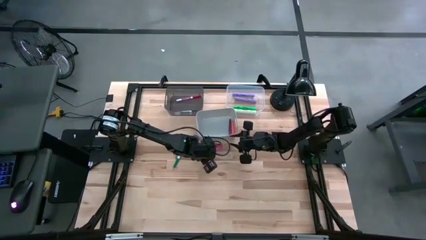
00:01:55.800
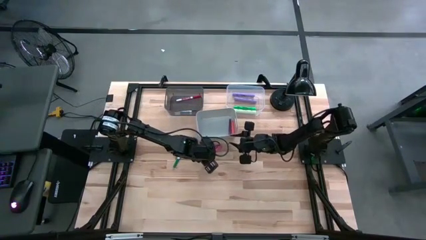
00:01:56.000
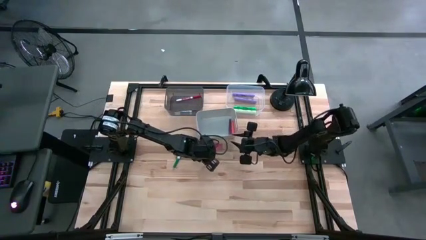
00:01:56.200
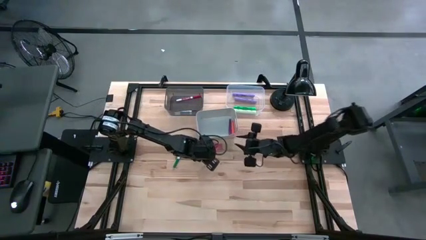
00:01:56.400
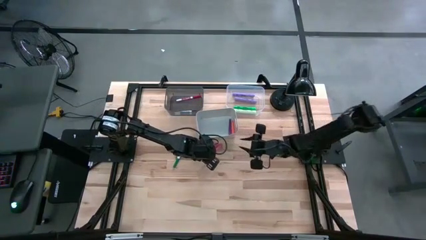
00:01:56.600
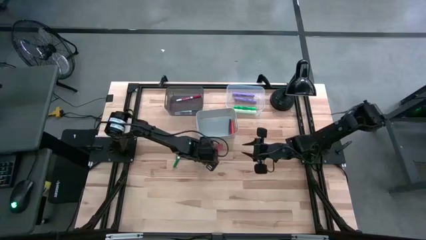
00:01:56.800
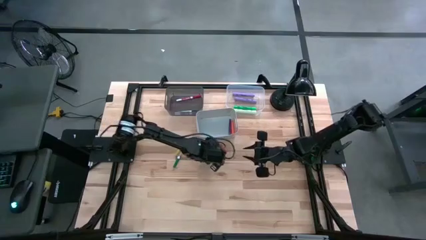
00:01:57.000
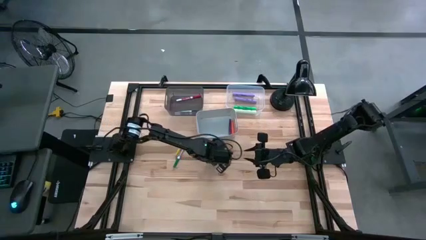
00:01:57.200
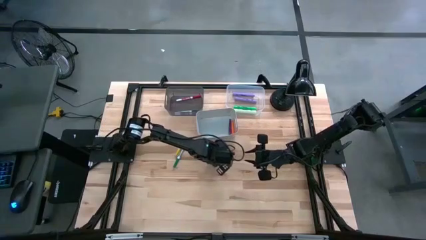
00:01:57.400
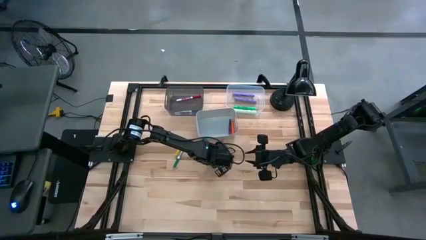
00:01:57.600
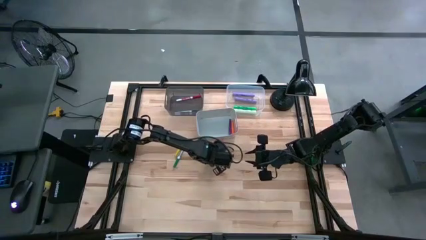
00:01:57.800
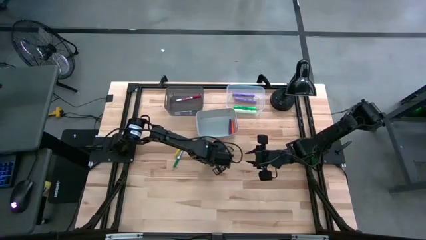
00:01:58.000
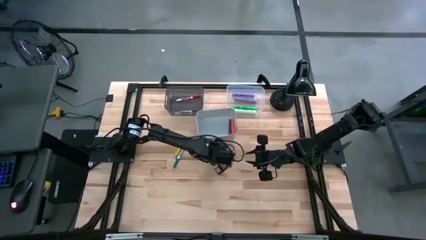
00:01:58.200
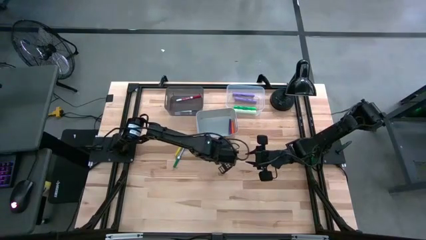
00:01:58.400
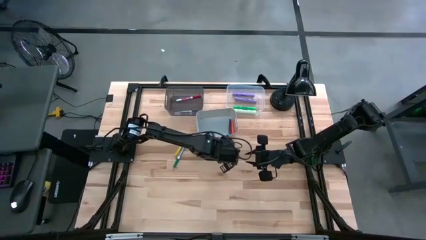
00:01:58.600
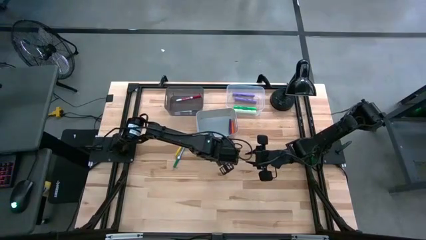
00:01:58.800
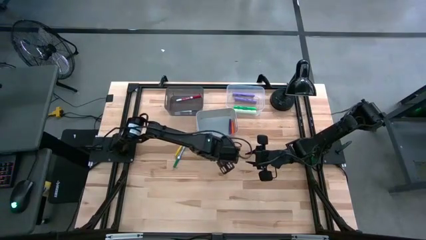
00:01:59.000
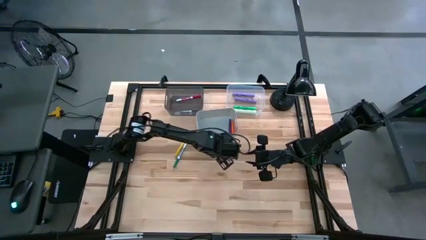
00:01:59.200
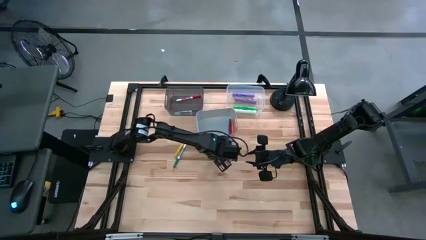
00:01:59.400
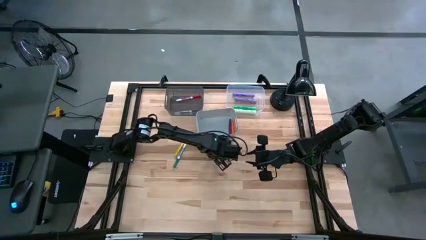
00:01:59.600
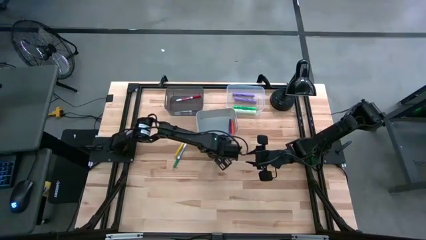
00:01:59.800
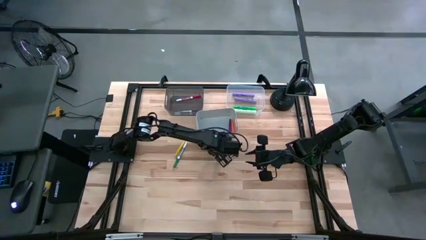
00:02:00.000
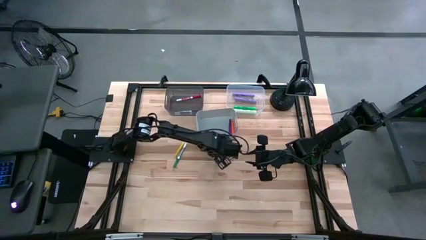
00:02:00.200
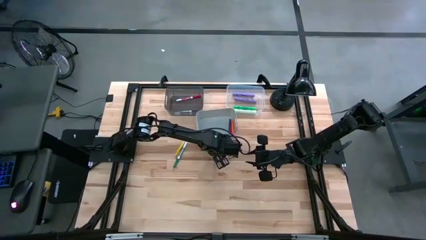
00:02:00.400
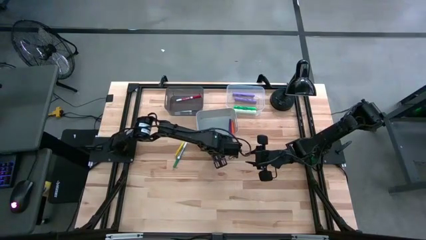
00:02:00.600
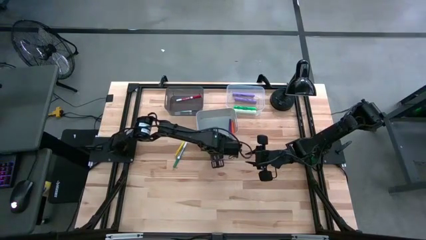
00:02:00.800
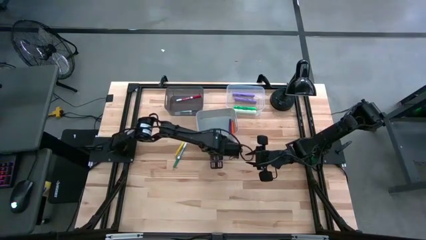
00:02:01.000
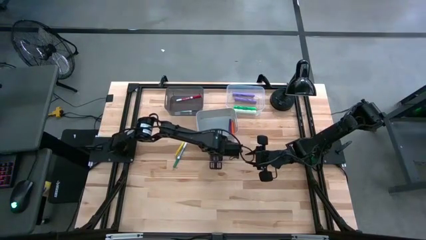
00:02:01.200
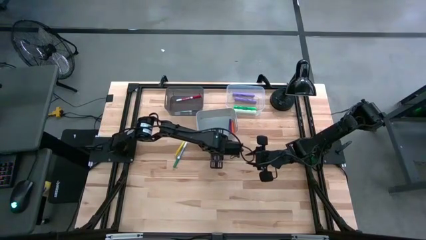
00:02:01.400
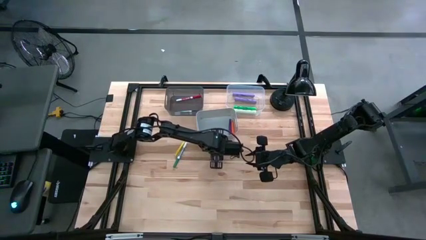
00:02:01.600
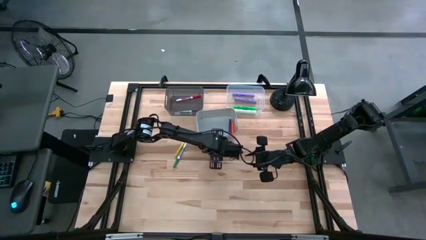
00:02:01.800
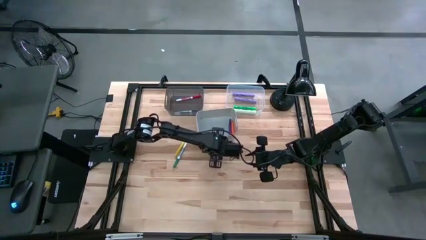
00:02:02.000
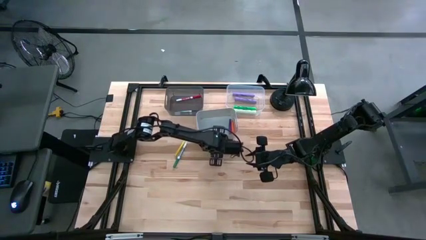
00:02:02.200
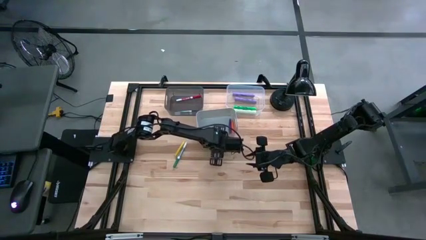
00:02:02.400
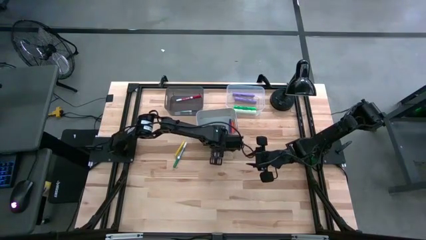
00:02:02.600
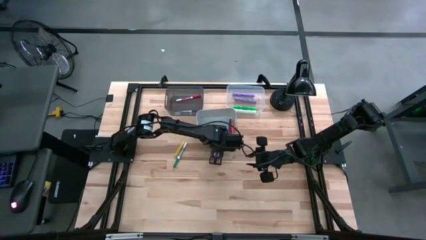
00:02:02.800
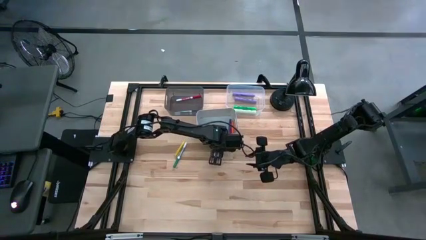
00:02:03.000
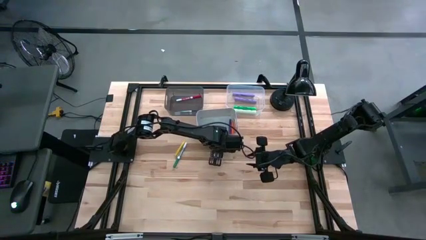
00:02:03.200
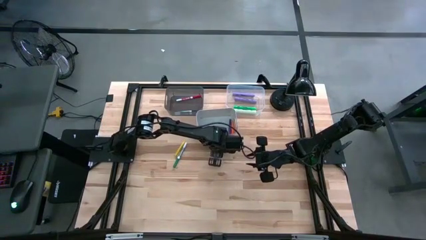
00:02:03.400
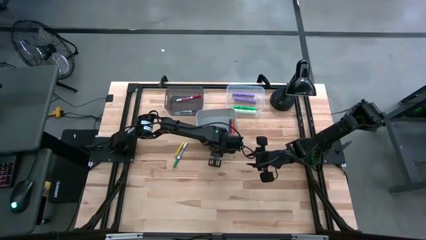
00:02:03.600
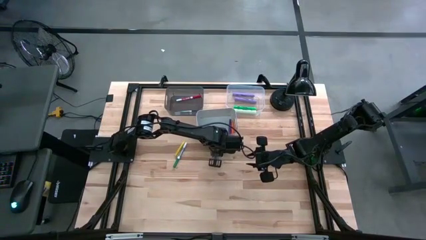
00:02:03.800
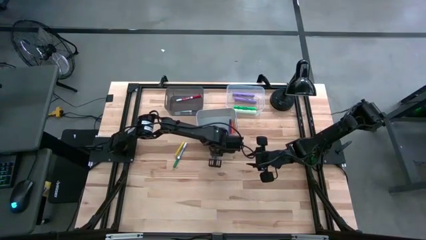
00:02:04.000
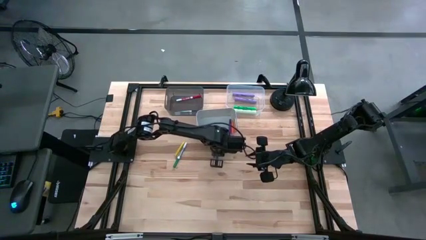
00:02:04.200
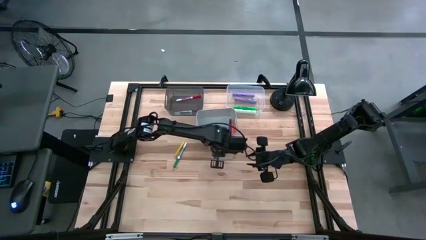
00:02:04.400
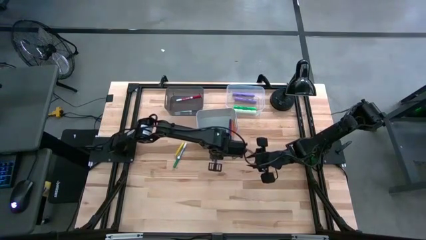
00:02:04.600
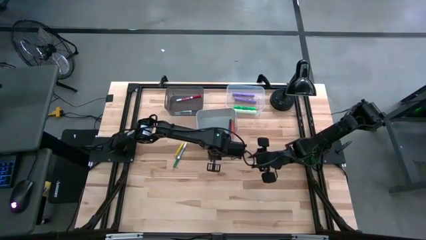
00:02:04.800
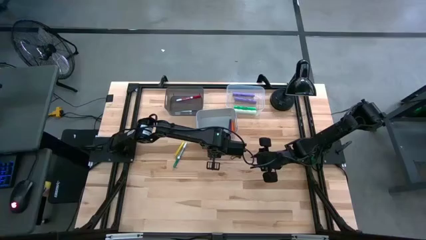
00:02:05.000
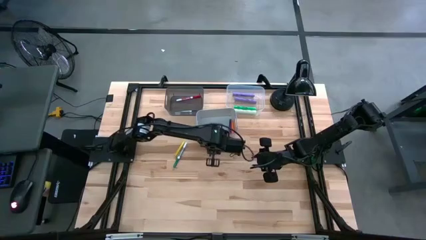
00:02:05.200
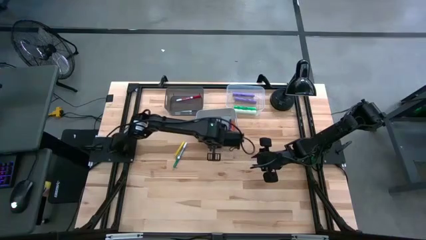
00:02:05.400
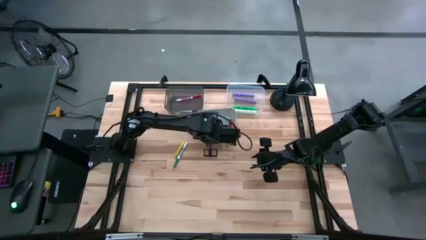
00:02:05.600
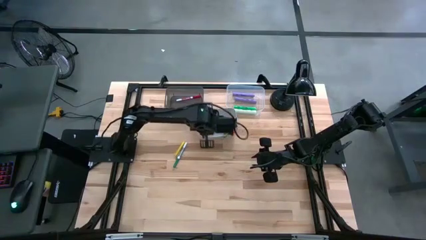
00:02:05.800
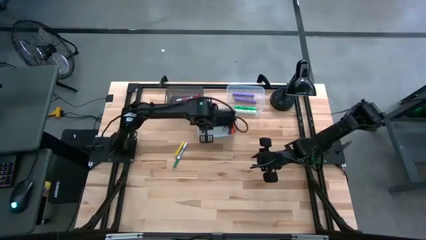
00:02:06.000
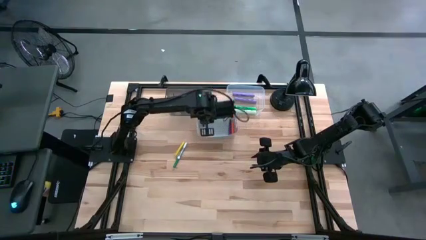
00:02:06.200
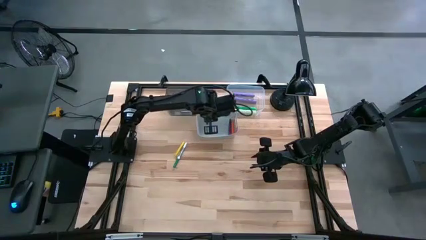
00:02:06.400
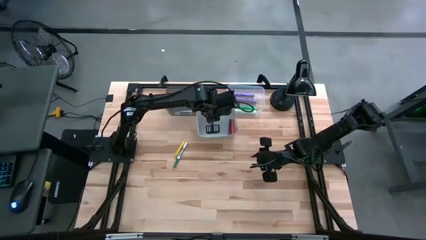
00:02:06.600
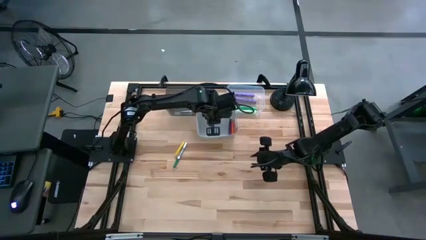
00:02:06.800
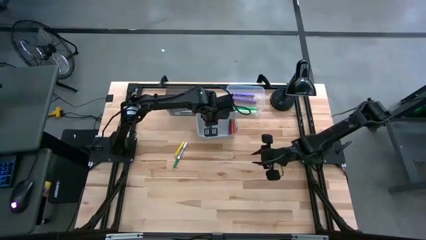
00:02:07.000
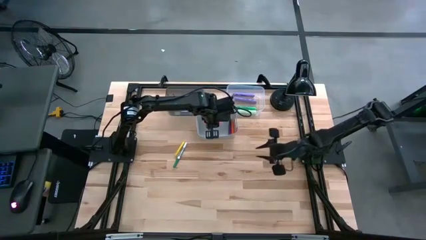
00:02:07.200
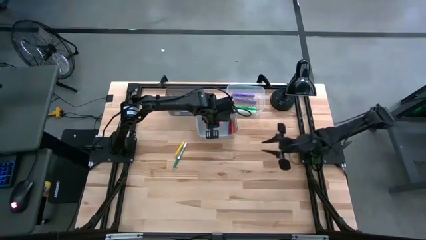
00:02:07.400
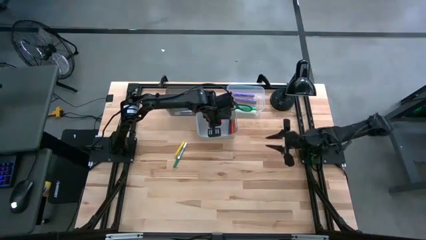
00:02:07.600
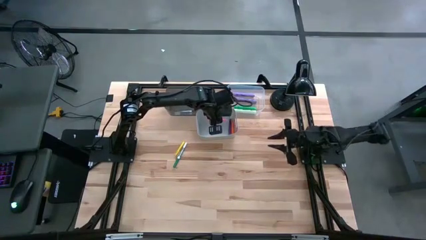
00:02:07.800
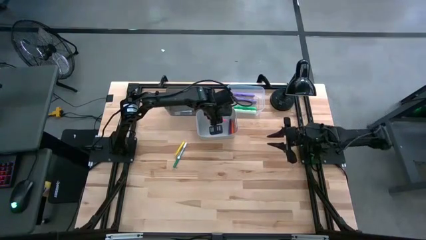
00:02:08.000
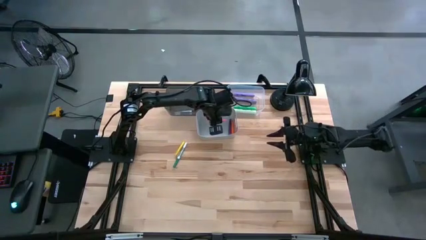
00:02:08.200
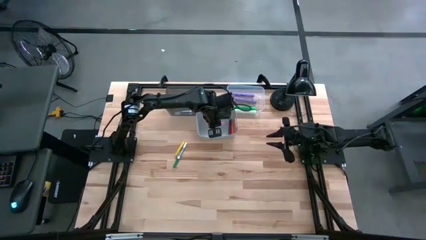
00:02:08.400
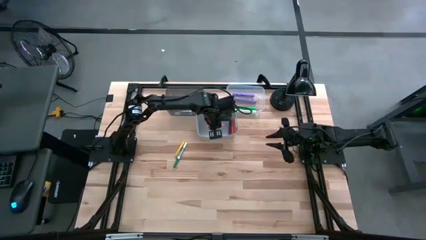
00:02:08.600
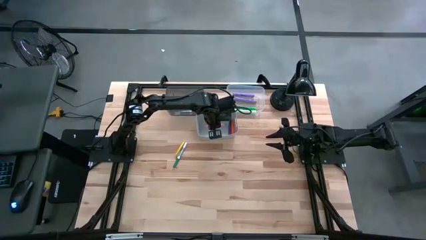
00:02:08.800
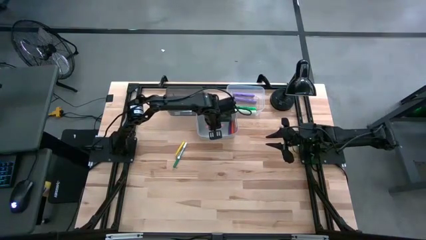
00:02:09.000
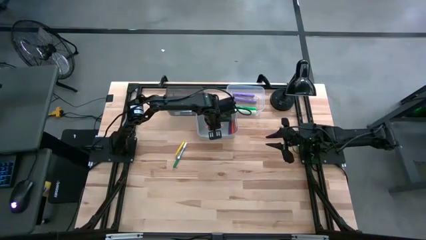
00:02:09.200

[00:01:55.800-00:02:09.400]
Task: Pick & Place Markers
Put the pink pen into the gray bin

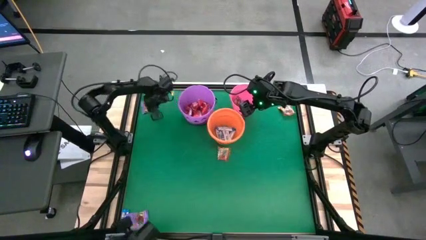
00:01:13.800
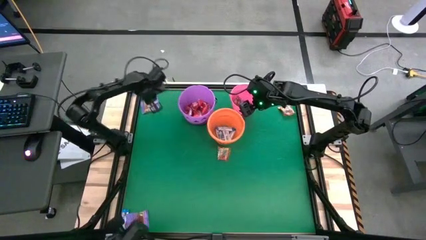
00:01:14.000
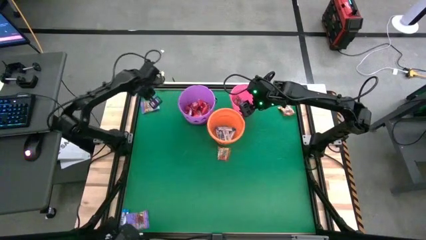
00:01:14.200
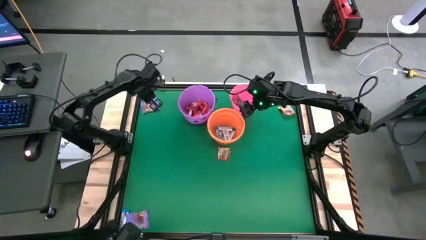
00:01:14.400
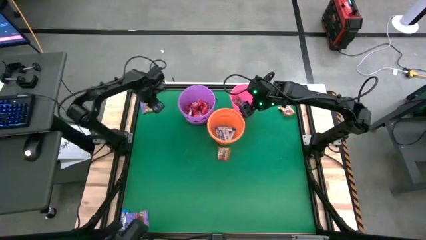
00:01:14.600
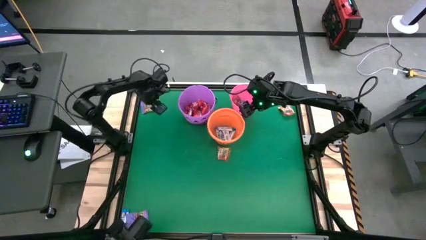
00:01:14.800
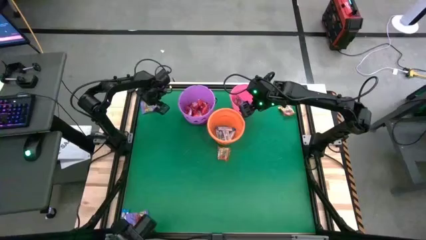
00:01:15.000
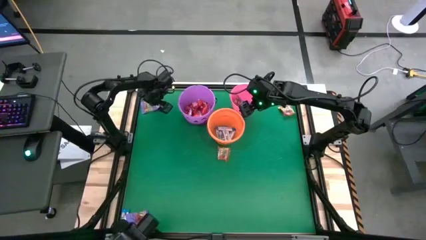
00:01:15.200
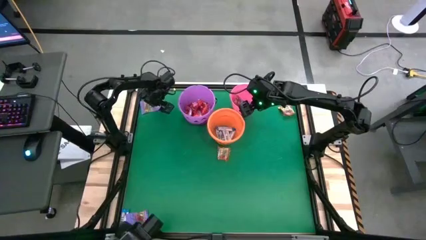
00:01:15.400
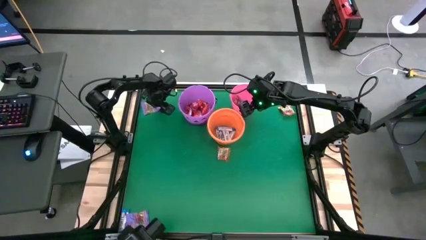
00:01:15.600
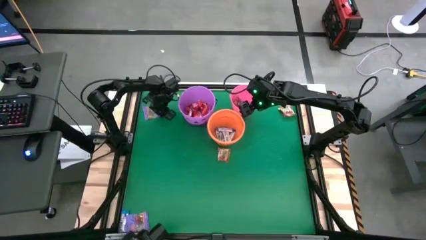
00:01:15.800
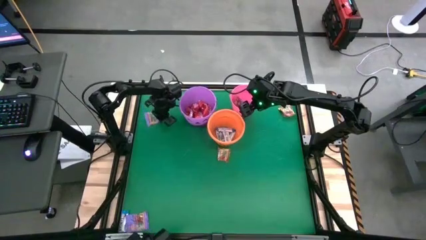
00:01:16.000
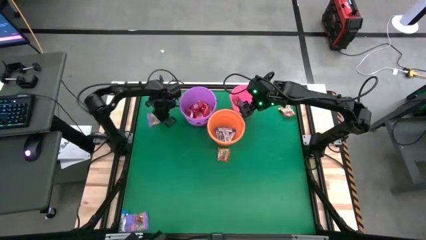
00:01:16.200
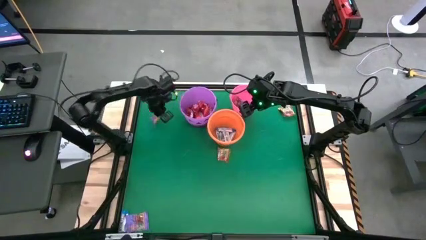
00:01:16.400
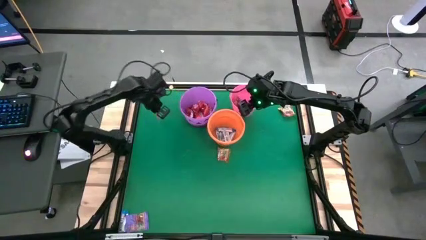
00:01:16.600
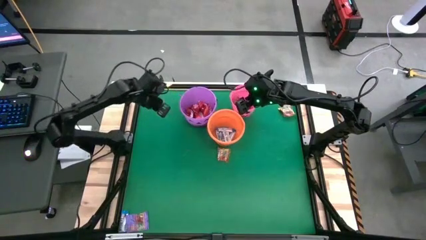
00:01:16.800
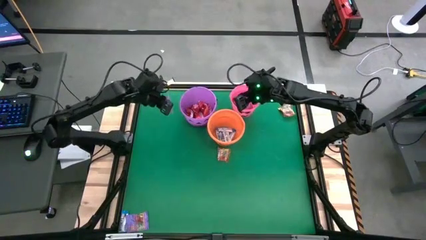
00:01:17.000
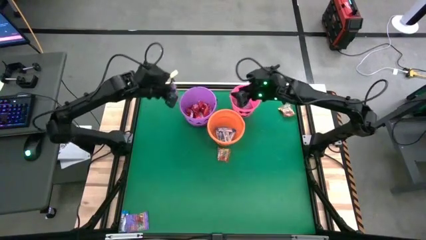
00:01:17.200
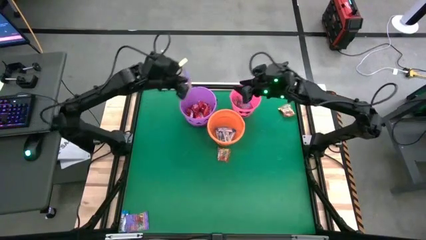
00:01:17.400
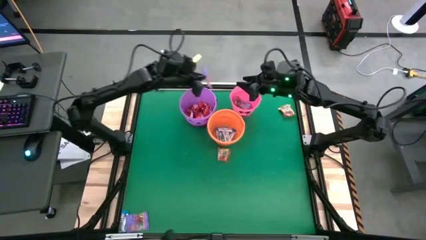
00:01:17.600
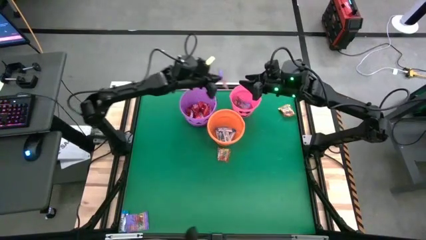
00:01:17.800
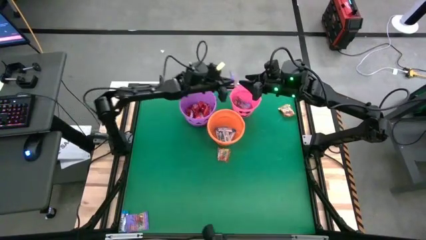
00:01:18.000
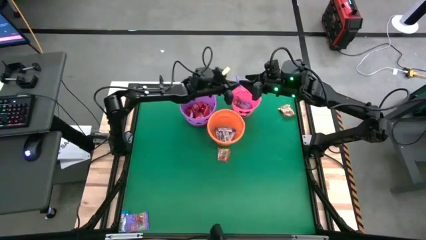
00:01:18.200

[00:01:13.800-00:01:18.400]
Task: Sort candy by brand, put in halloween buckets
Put the violet gummy candy into the pink bucket
